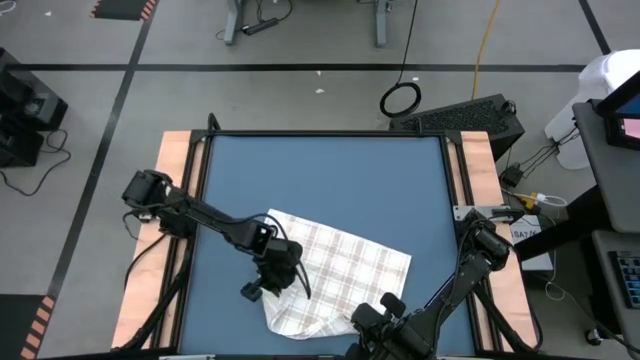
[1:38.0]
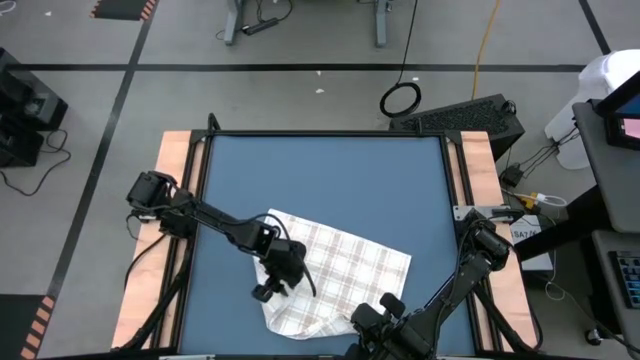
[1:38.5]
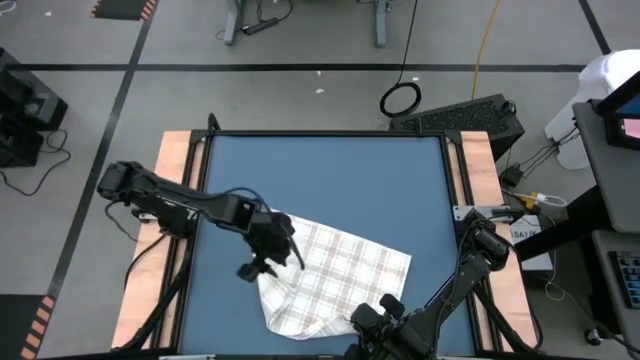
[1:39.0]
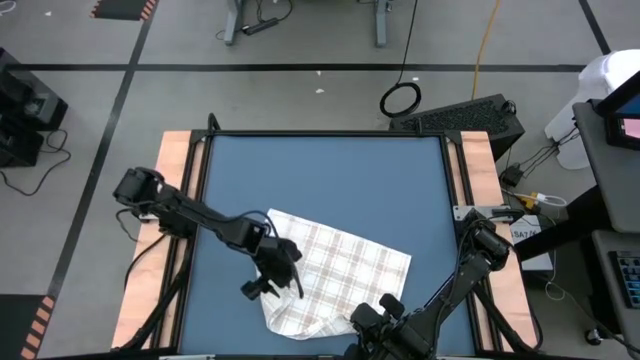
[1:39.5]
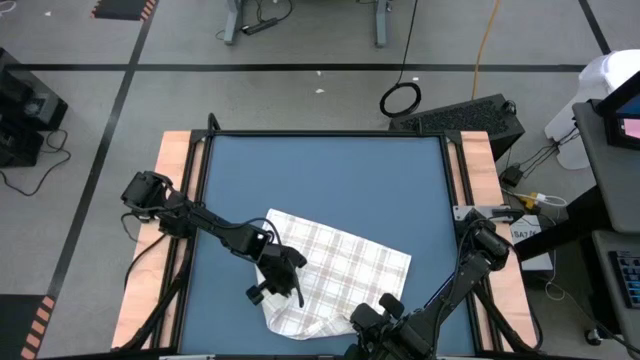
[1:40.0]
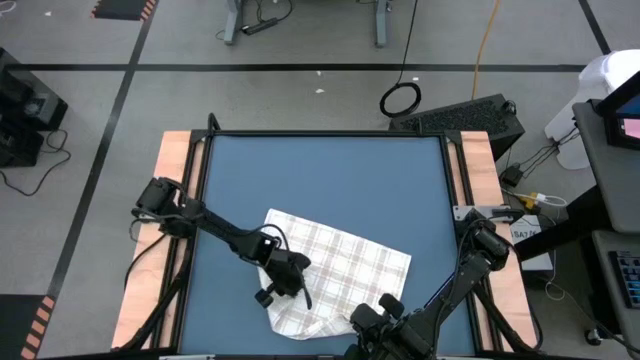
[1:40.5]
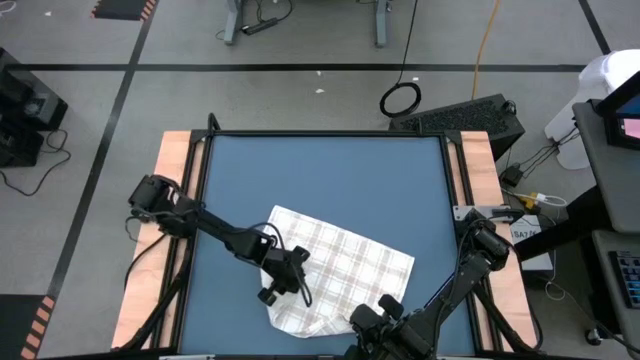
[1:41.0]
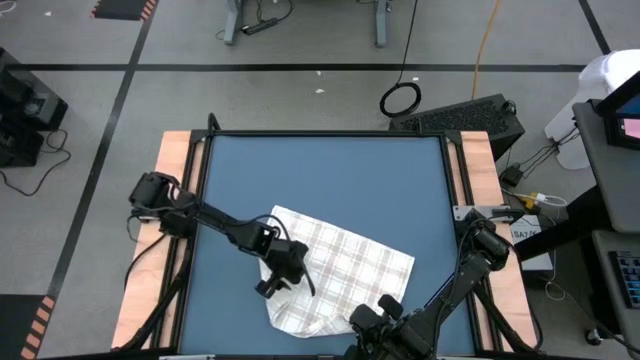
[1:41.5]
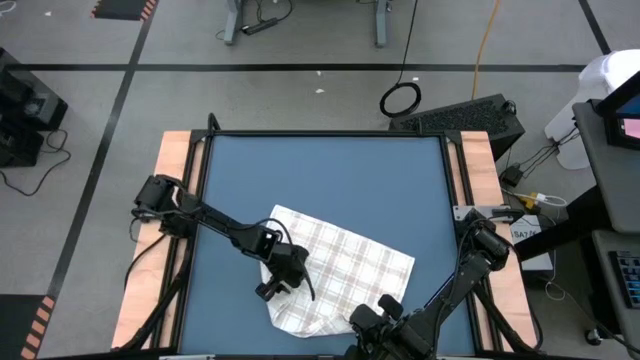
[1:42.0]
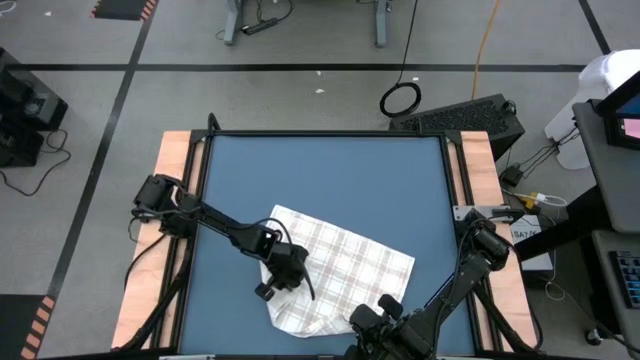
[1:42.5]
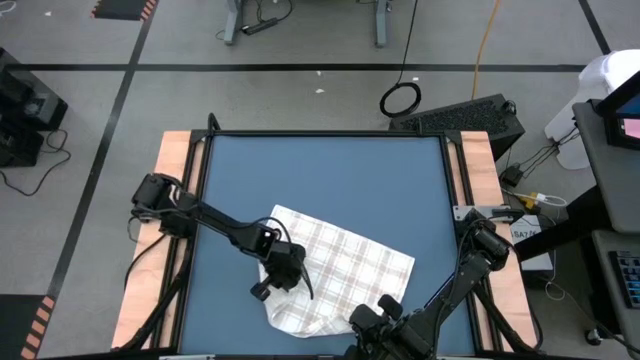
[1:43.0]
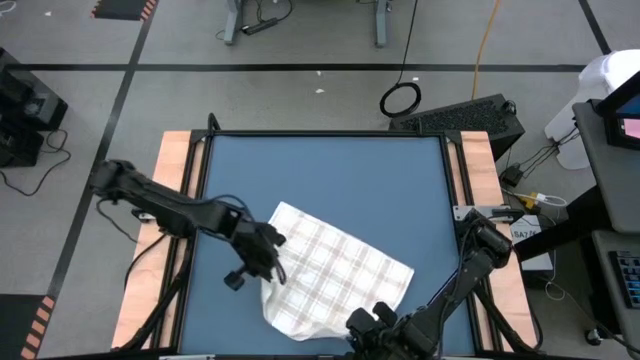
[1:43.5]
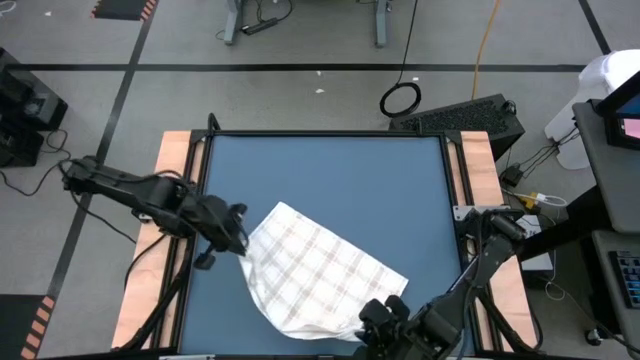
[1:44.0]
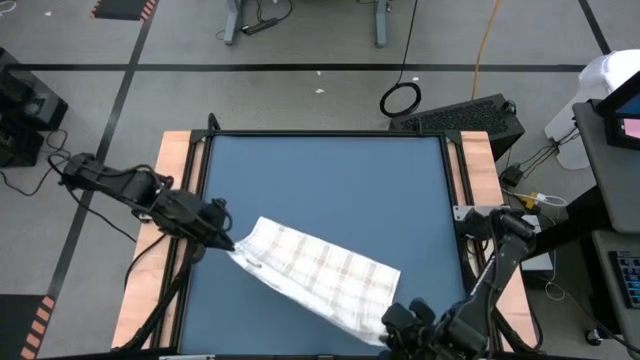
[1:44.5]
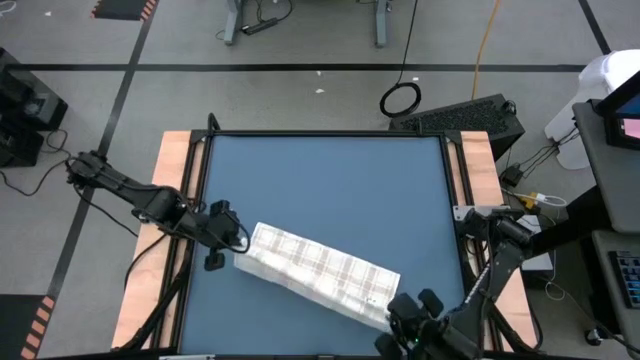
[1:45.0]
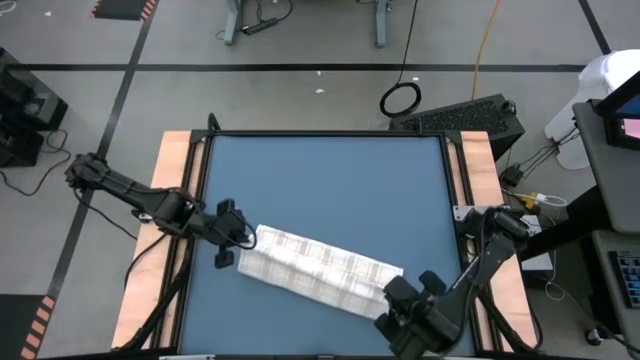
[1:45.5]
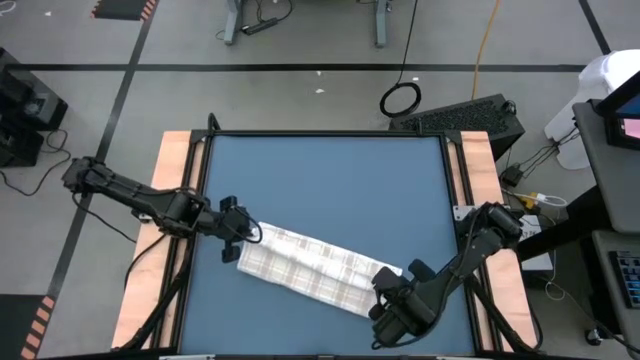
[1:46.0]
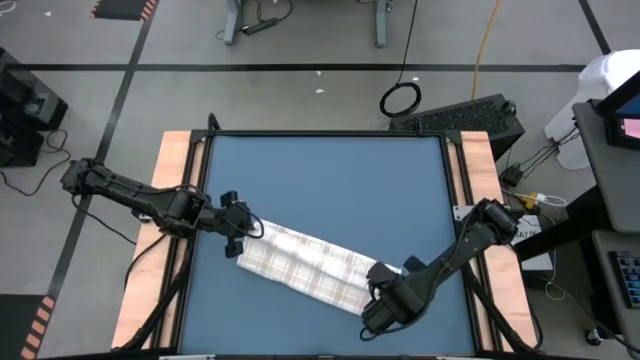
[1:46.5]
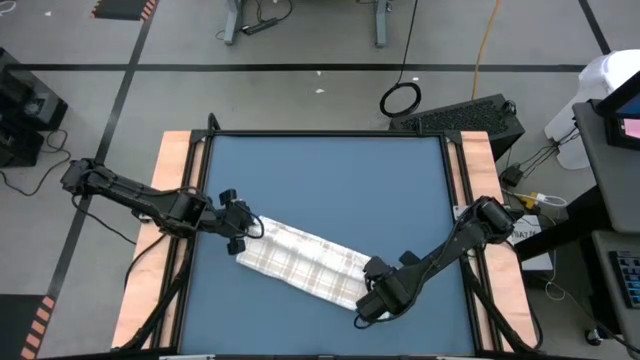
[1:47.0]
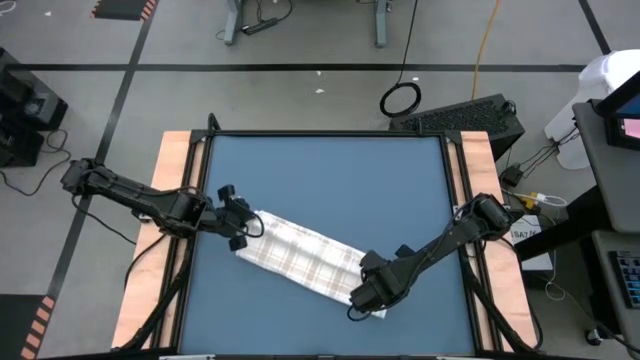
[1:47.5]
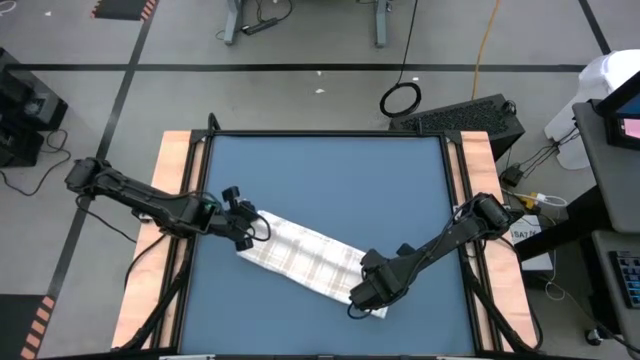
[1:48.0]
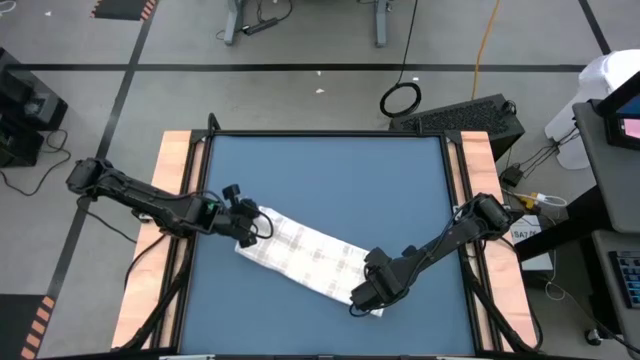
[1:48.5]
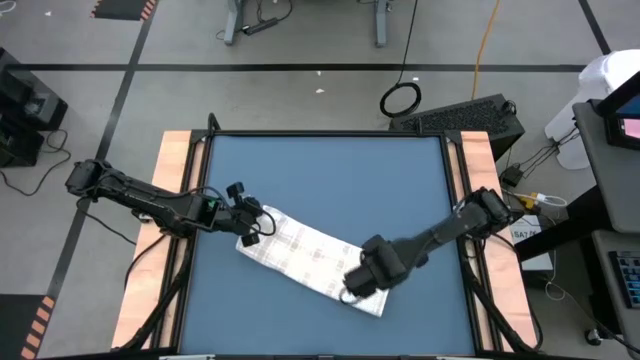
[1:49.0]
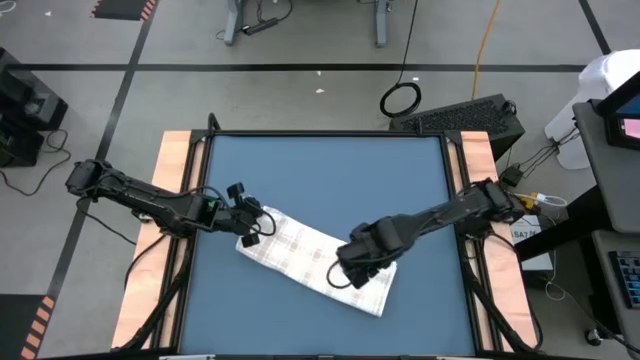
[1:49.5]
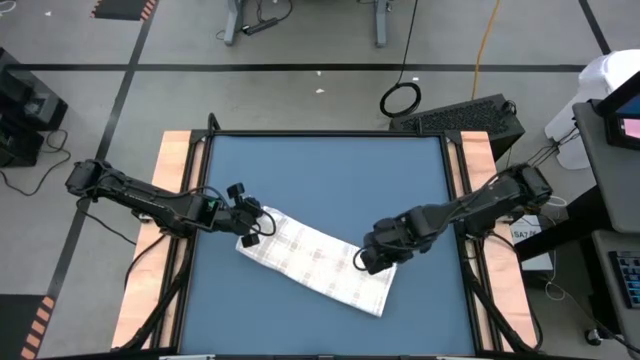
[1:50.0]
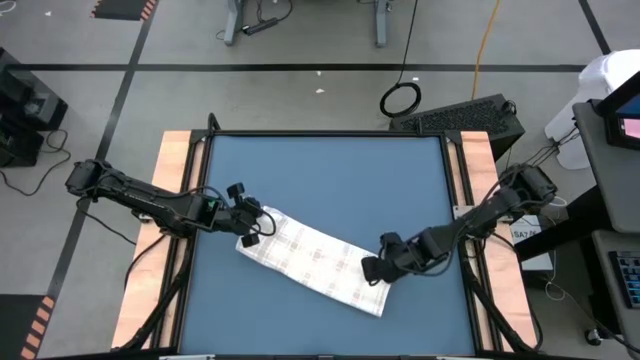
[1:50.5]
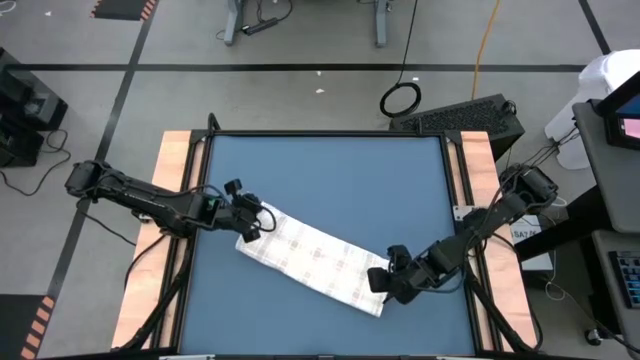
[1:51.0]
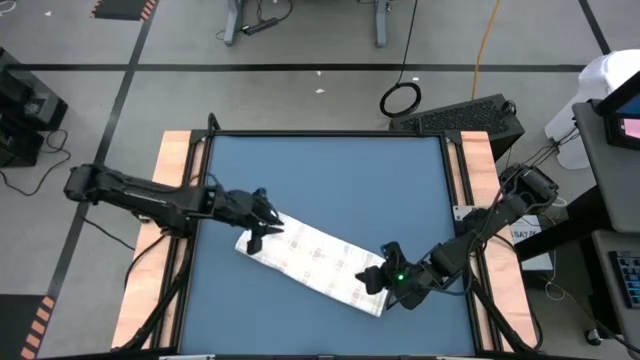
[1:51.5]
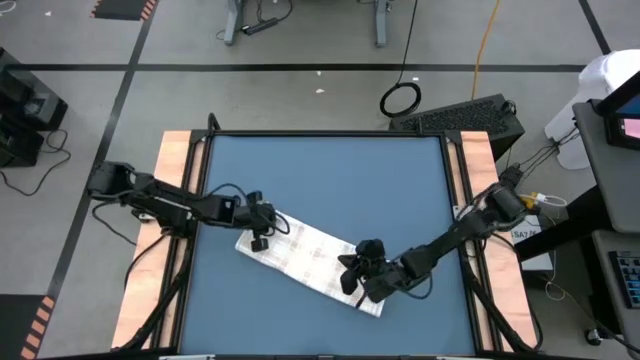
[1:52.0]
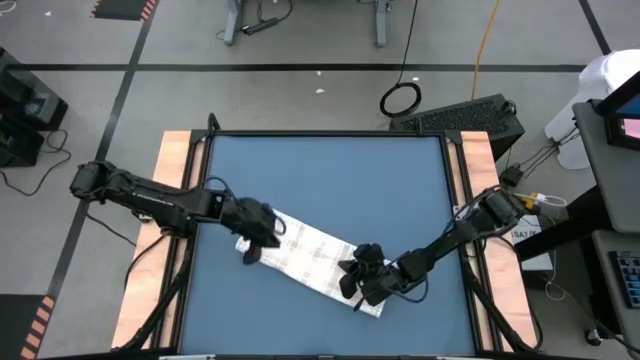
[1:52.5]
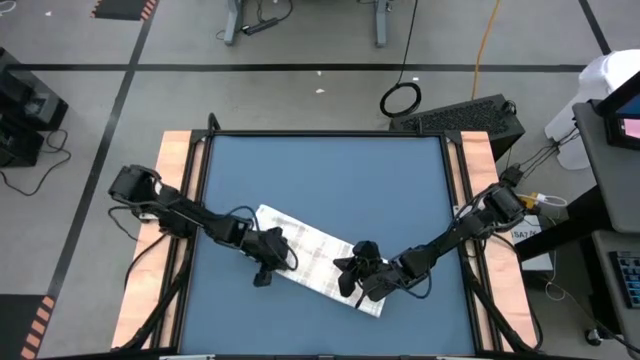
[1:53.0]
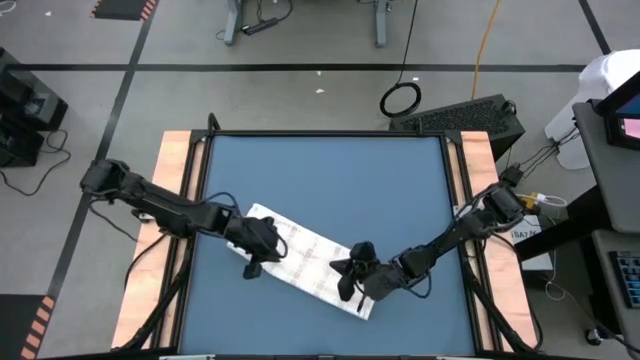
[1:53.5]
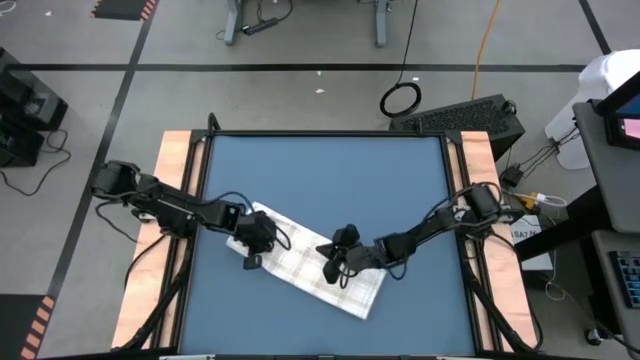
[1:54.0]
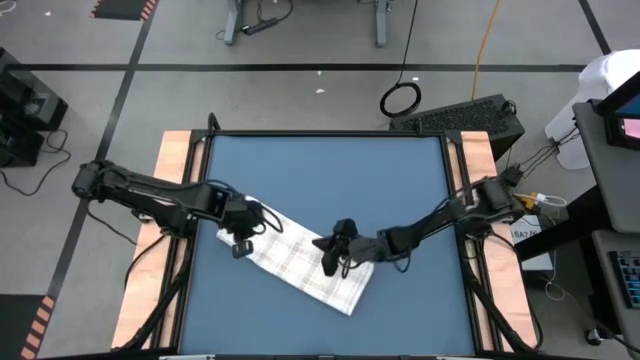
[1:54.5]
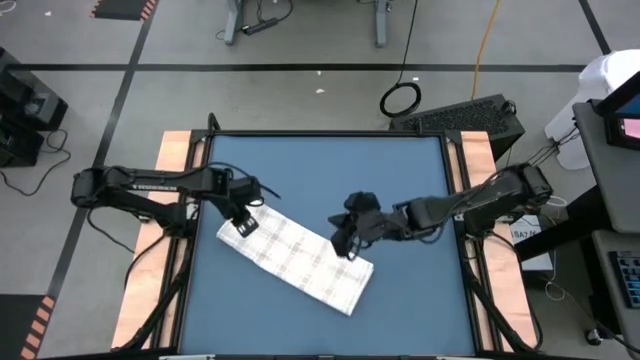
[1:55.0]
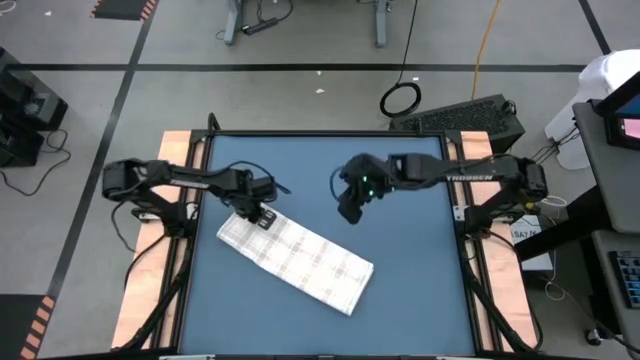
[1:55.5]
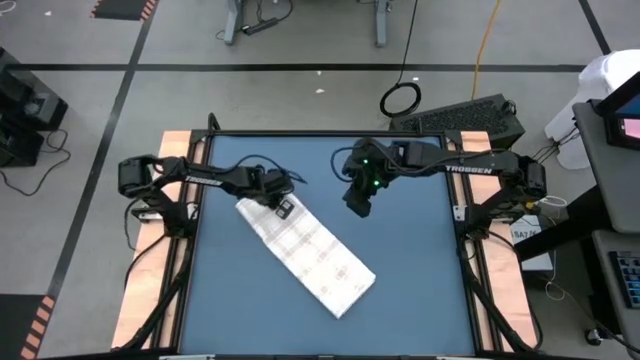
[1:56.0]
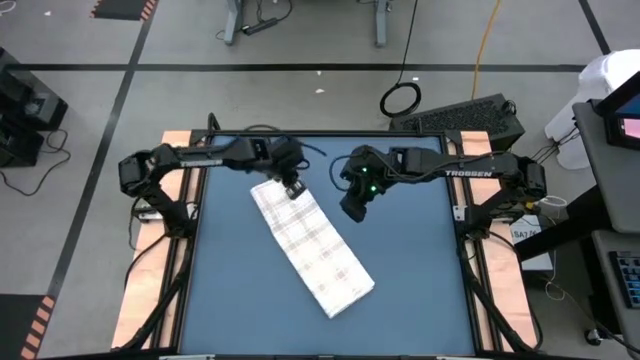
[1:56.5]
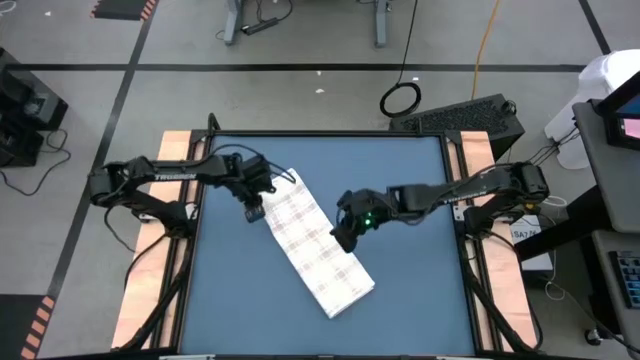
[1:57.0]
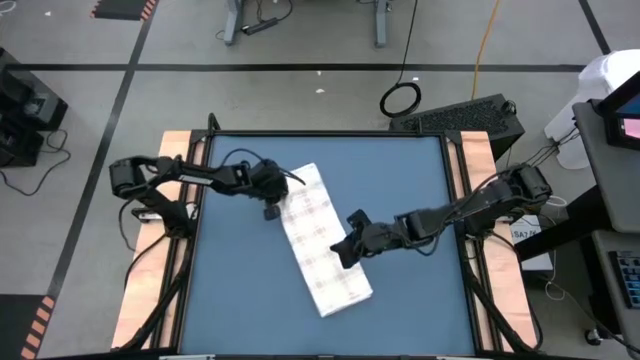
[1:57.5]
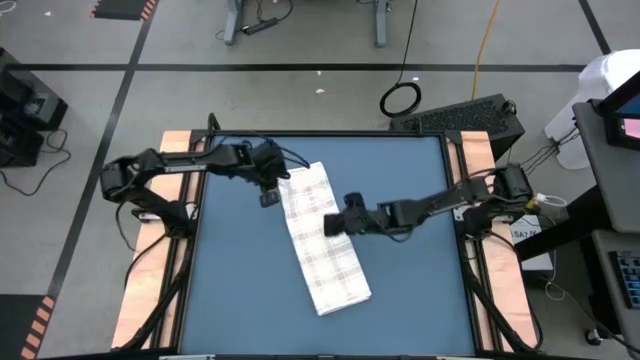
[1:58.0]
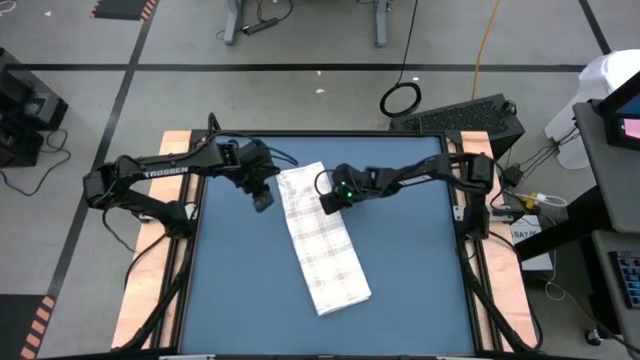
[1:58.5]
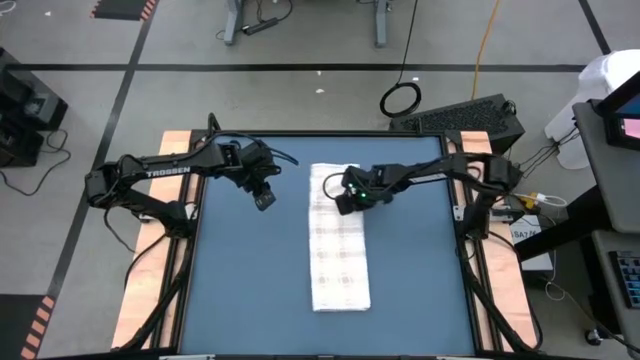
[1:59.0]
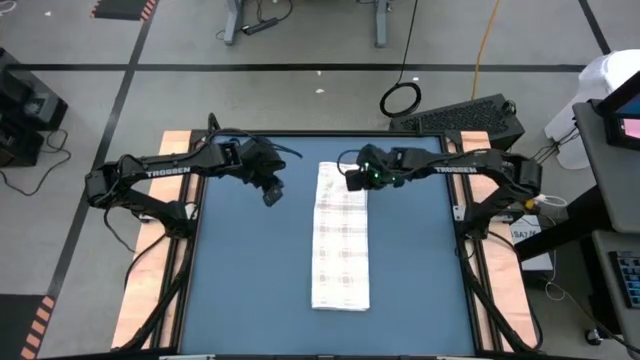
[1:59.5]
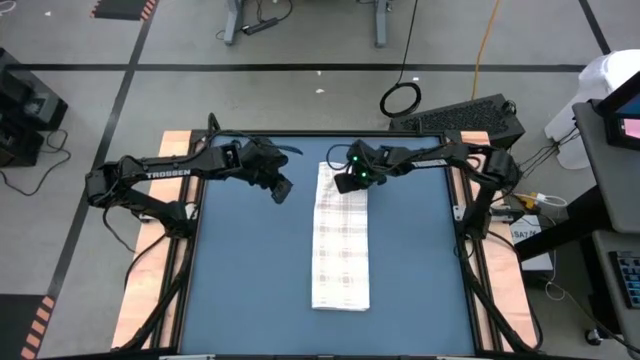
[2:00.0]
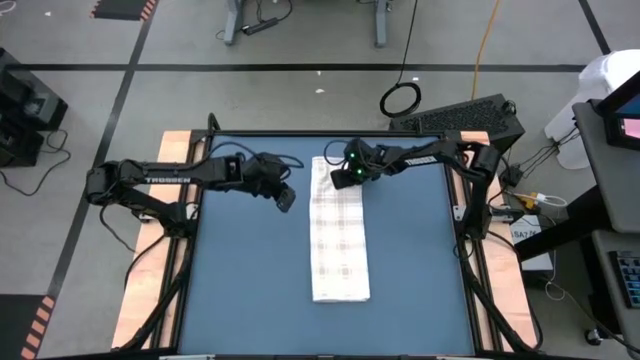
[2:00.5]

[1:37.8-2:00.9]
Task: Roll towel
Fold the white towel
